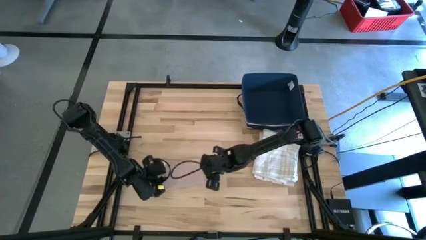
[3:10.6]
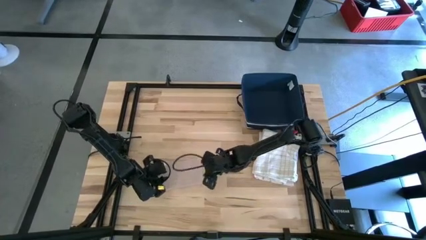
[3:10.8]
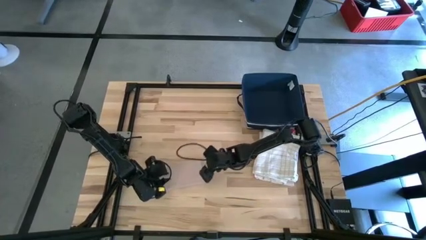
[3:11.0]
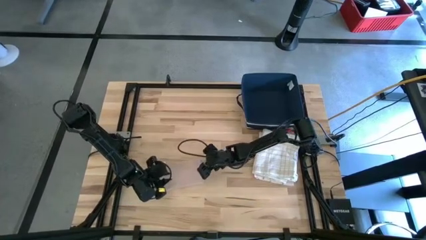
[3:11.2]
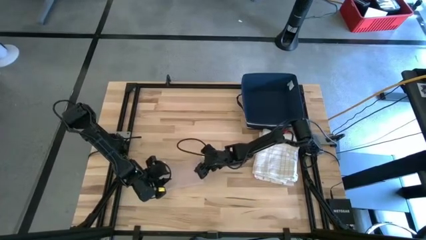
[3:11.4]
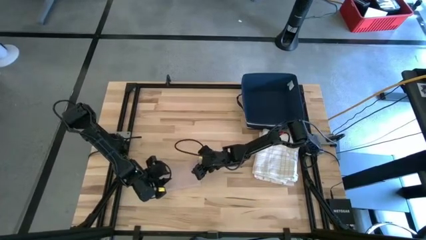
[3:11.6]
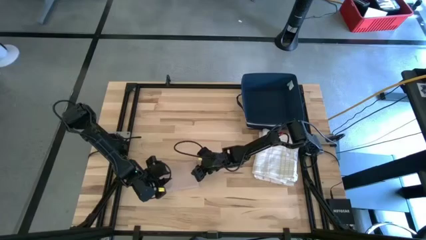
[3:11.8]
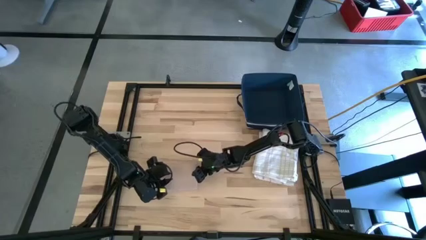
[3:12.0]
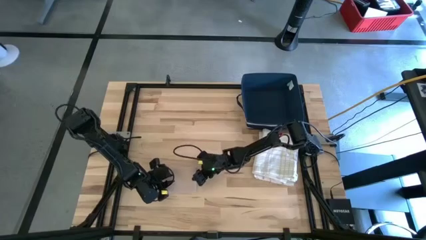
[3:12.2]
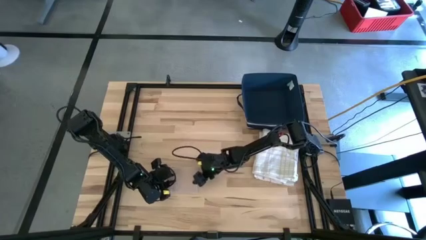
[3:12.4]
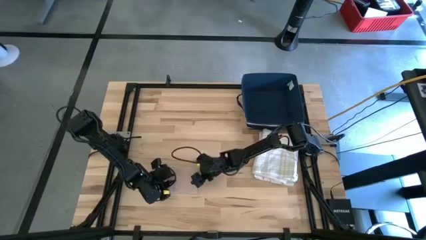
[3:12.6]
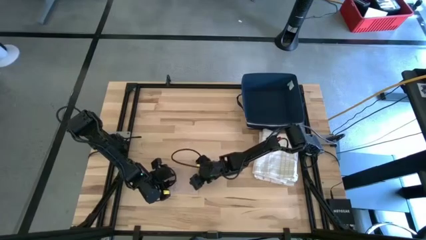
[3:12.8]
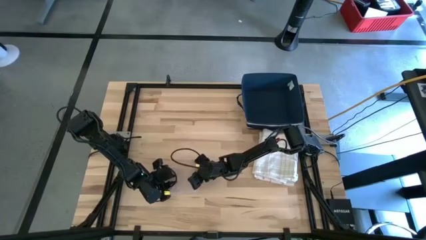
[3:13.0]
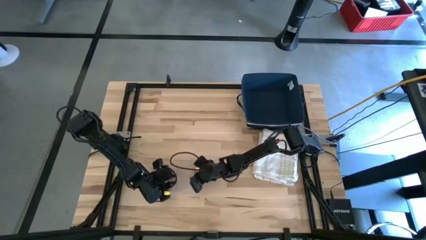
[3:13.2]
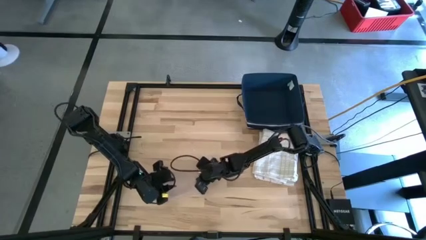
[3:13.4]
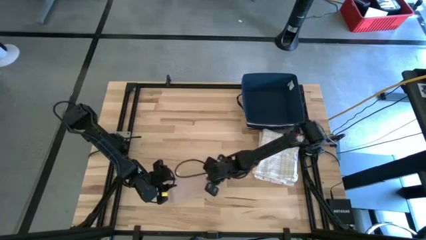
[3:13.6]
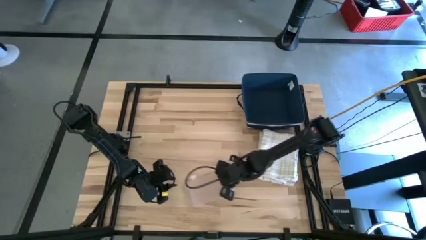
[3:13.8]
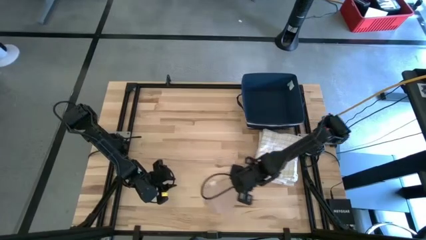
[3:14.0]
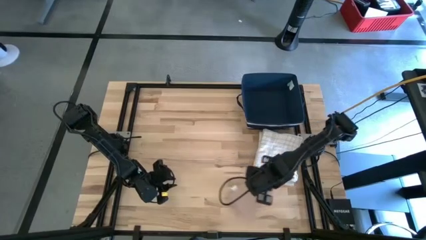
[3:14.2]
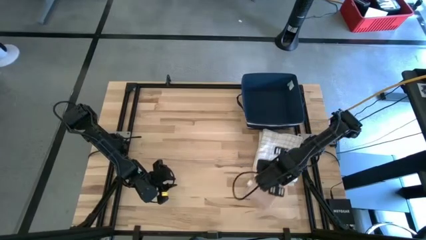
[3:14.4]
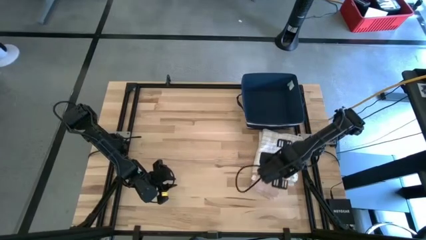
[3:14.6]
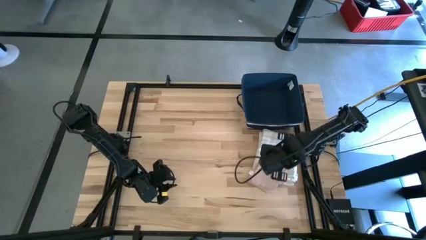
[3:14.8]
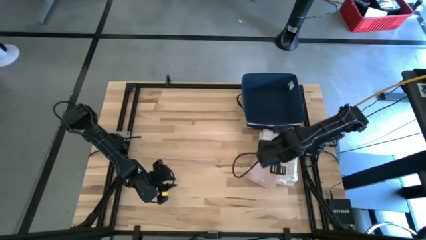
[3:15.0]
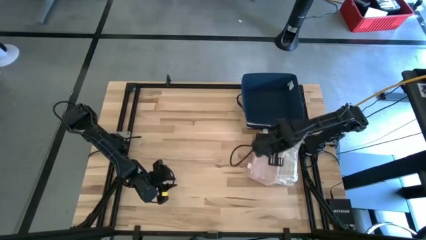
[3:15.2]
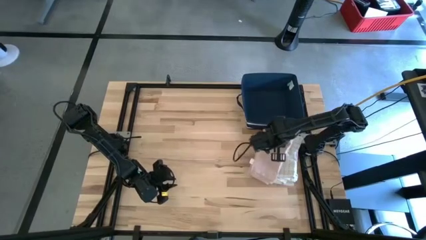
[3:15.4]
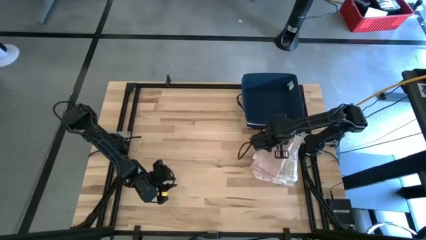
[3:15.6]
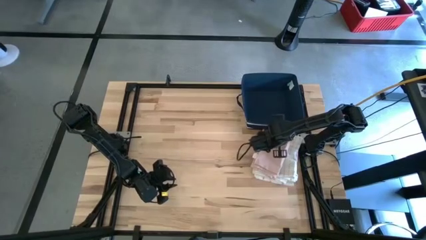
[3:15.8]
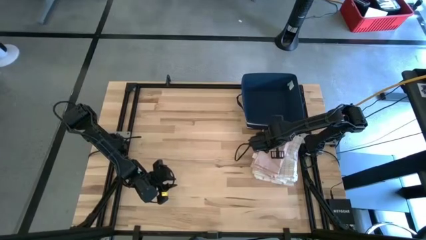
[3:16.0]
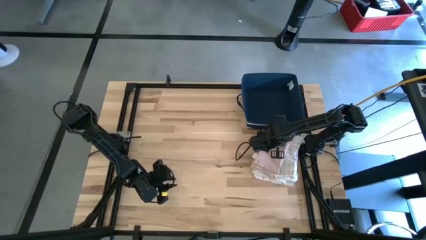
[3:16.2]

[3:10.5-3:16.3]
Task: Fold towel
Stack the light brown towel on the white plaid towel

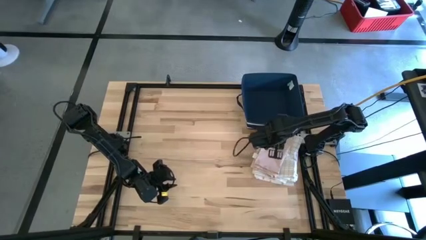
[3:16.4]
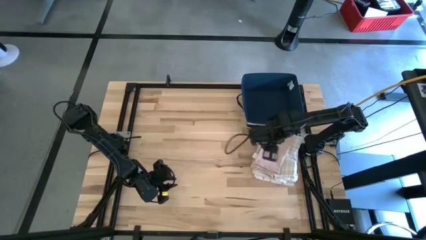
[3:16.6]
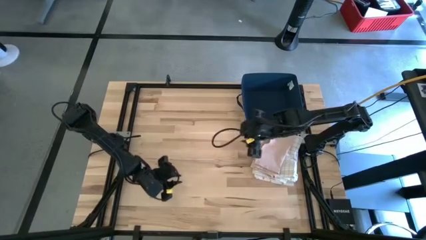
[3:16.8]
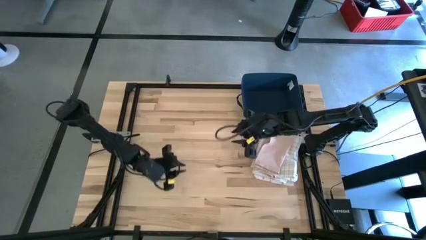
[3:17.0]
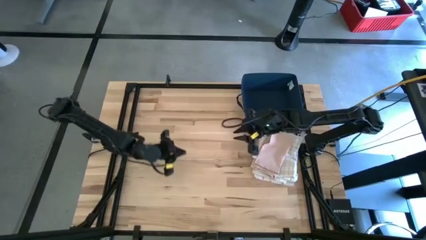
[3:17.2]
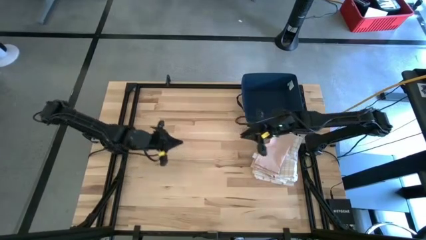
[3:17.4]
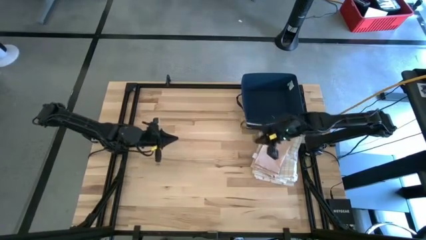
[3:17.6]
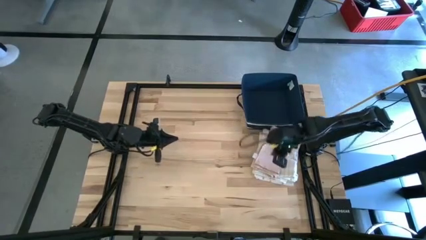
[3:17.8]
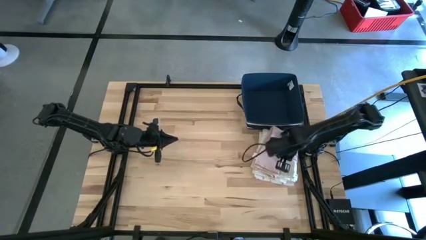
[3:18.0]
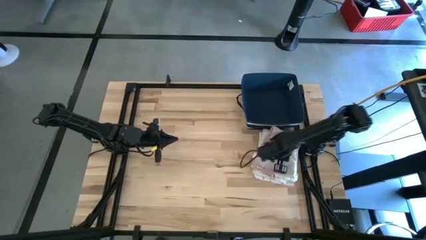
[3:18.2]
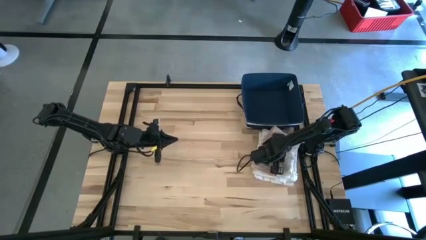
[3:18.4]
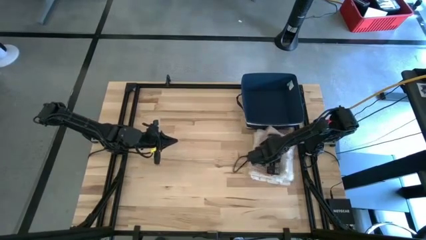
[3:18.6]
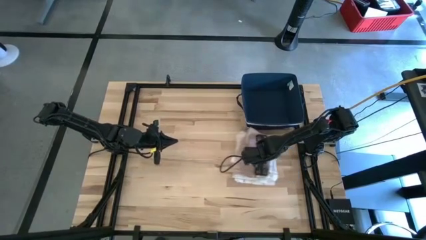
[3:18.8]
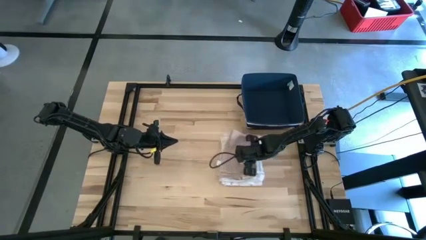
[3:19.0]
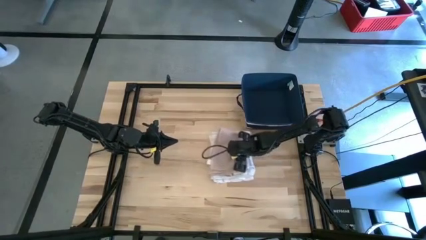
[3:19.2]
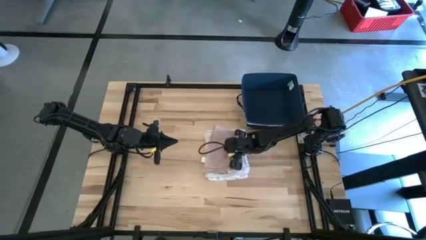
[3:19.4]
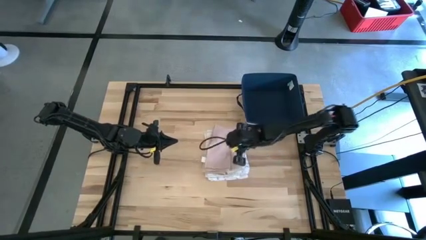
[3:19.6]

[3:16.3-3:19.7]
Move the stacked towels to the center of the table

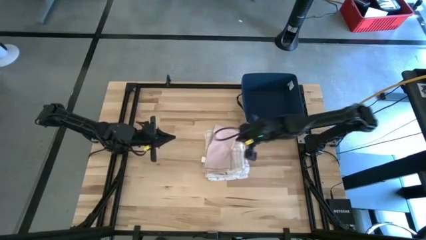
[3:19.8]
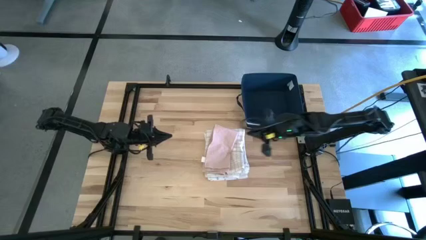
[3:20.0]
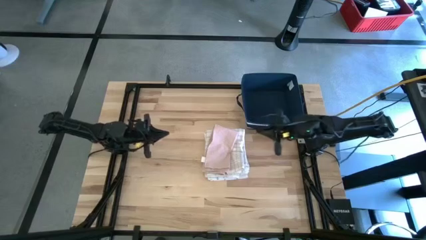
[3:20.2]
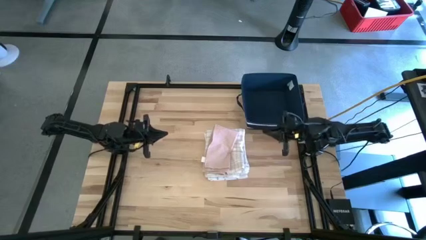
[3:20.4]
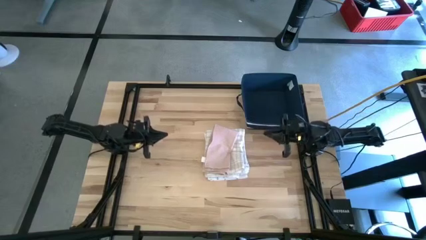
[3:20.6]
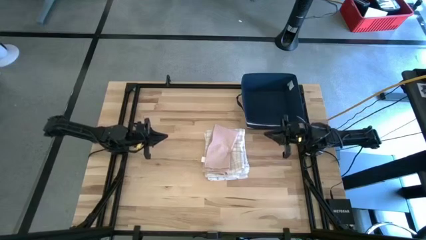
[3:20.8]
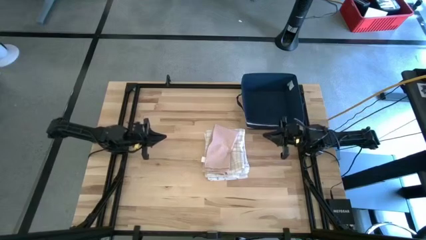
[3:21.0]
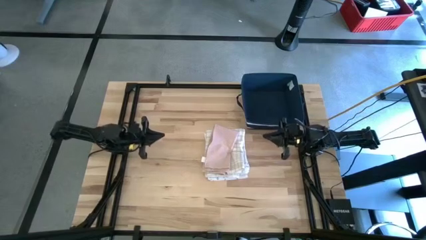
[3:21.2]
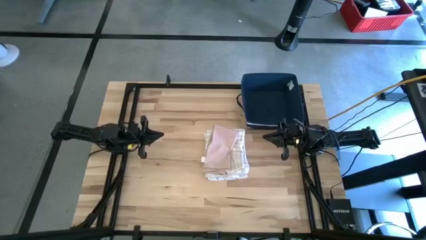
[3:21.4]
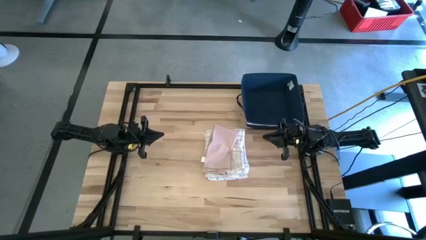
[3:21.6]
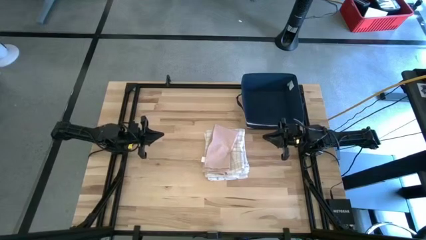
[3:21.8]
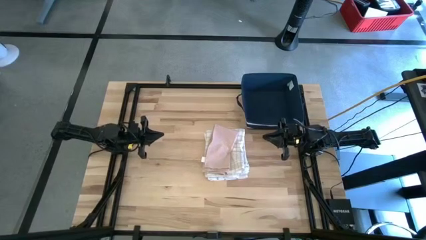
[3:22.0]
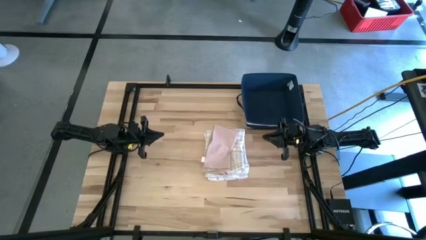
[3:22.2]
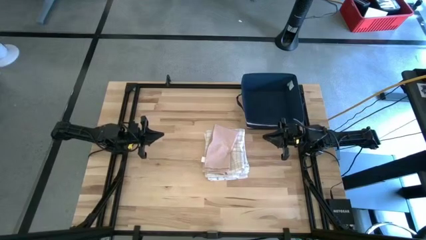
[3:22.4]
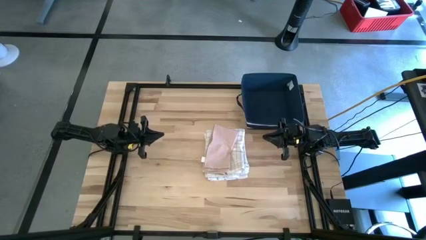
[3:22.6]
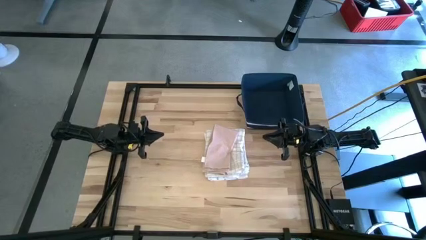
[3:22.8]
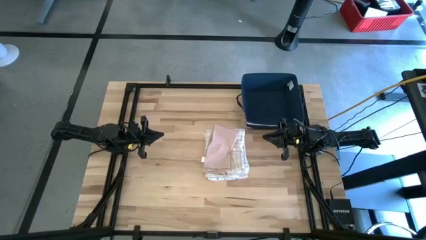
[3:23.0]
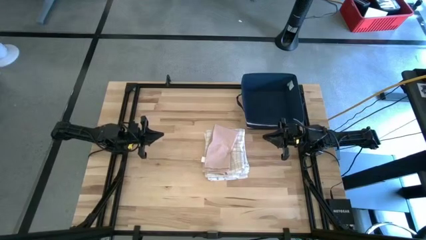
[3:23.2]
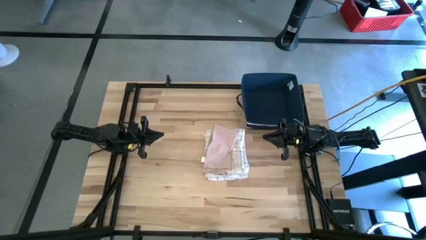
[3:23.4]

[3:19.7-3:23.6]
Return to Home Position

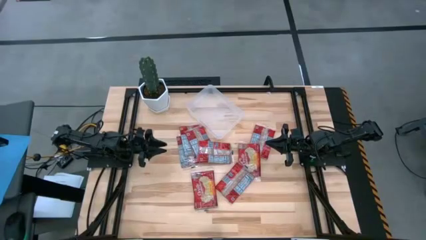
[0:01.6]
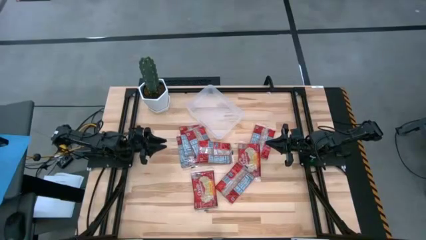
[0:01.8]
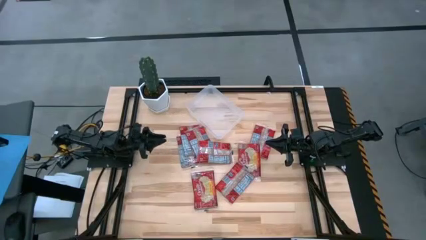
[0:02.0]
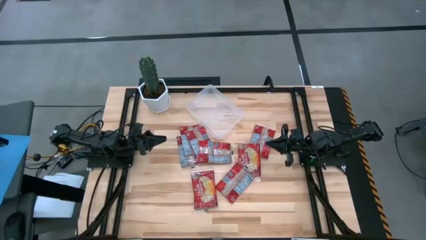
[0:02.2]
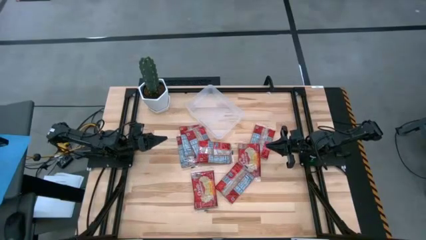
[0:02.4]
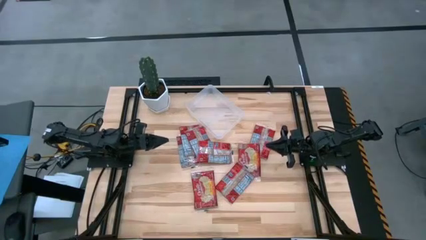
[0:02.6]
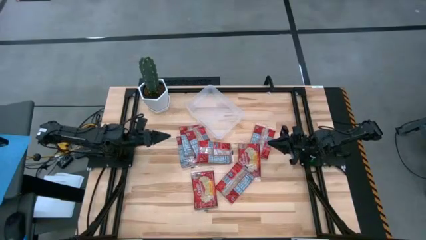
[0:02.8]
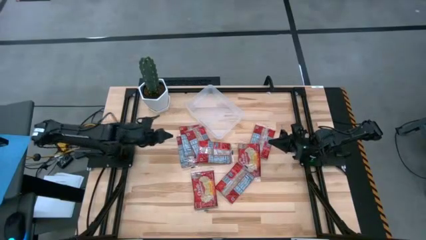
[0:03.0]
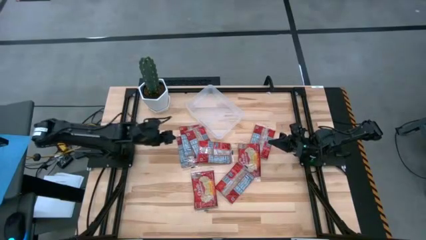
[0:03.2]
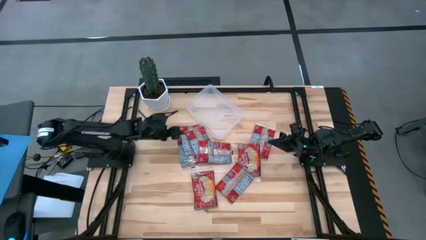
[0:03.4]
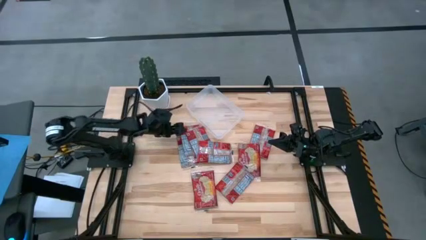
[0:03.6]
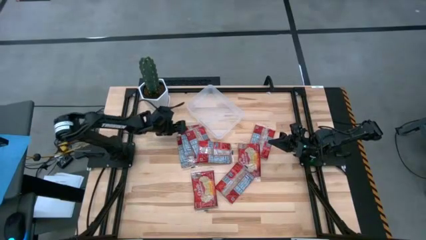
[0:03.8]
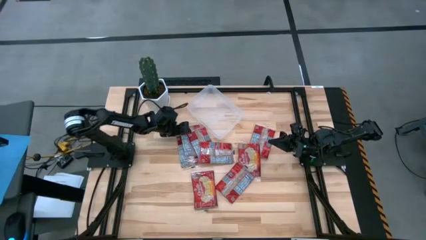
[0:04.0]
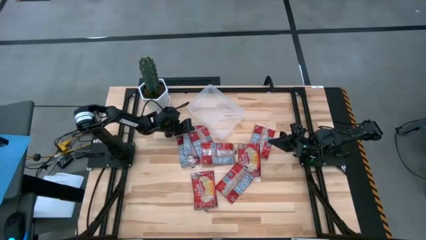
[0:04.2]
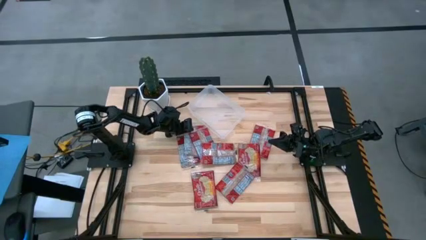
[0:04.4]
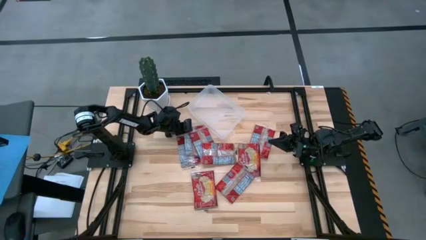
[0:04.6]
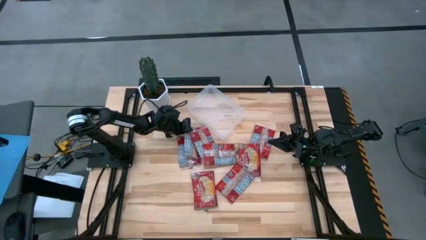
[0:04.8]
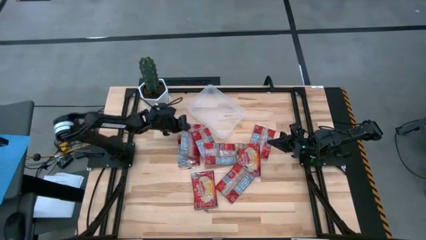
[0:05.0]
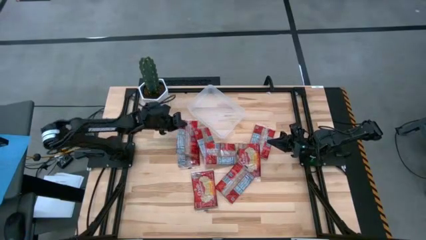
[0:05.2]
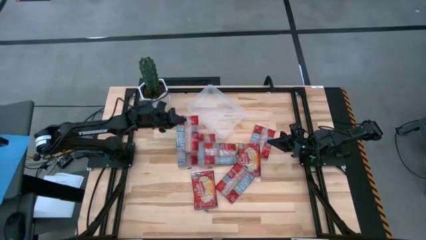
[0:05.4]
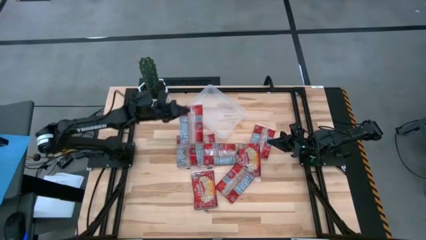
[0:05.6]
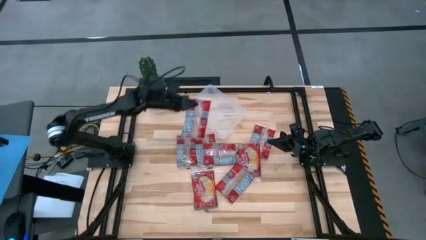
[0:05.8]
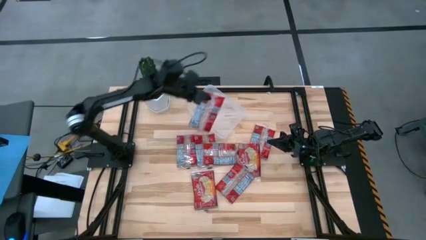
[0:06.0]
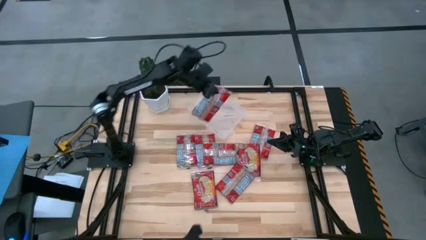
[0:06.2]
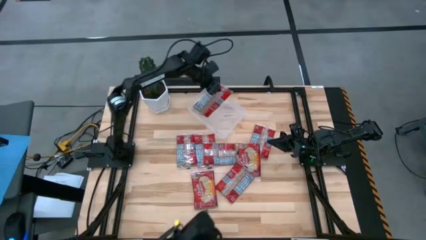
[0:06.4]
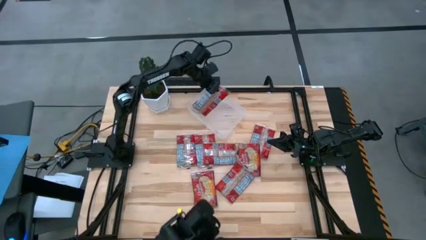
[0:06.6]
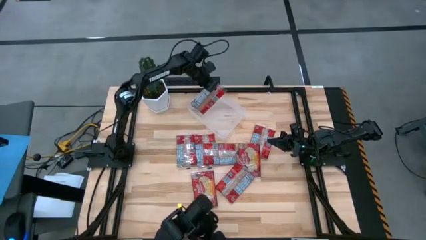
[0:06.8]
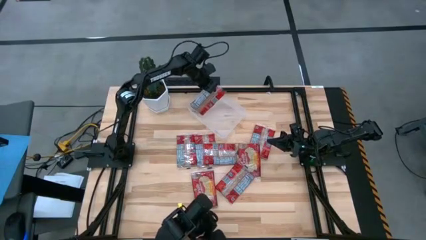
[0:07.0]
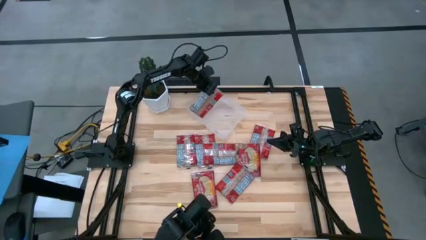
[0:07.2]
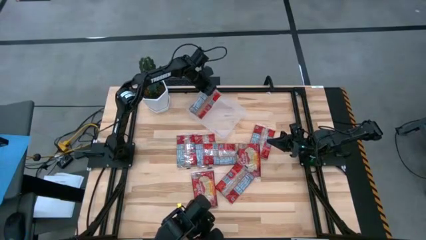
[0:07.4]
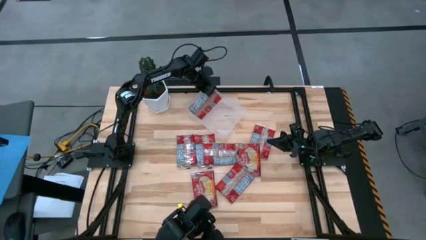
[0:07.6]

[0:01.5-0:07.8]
Task: Sort popcorn bags into baskets
Put the red popcorn bag into the transparent bin
